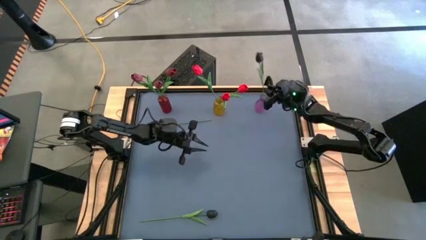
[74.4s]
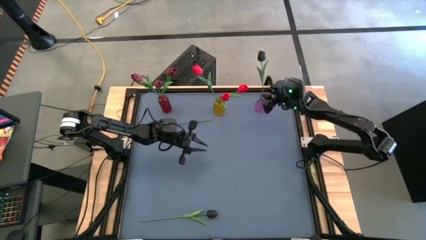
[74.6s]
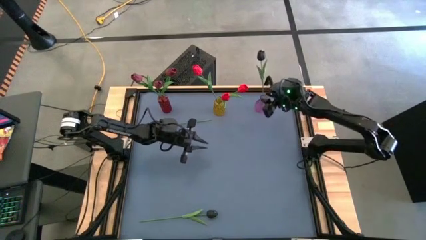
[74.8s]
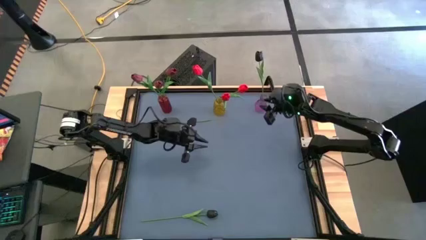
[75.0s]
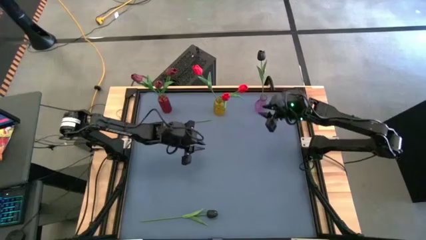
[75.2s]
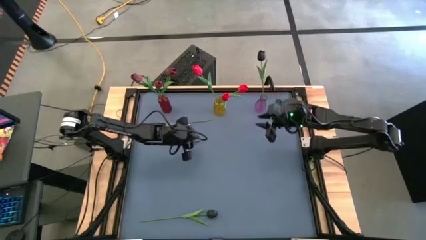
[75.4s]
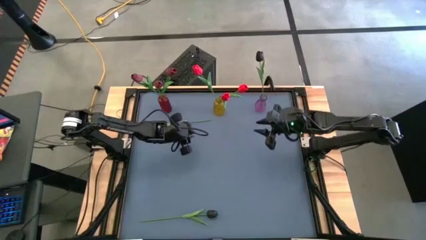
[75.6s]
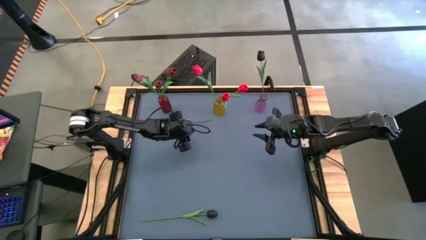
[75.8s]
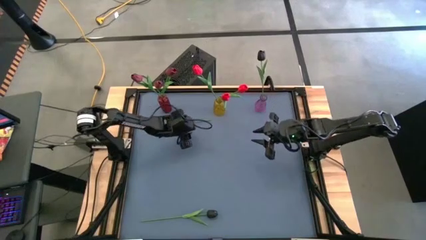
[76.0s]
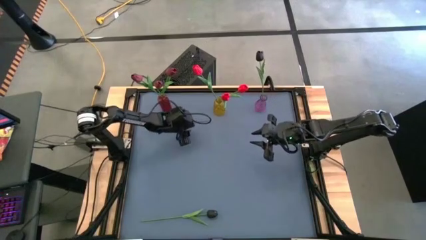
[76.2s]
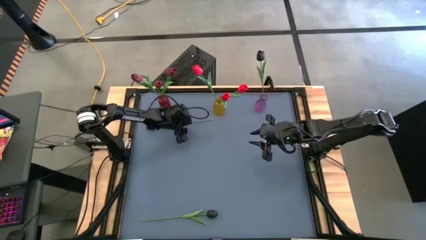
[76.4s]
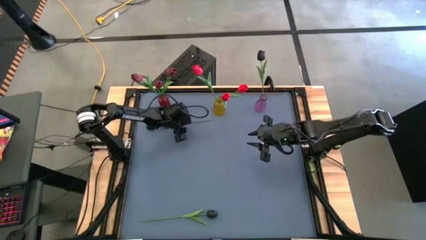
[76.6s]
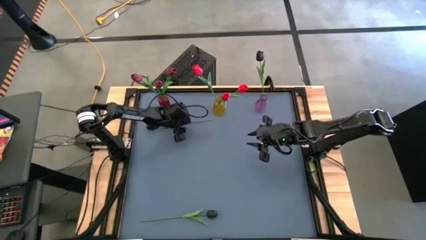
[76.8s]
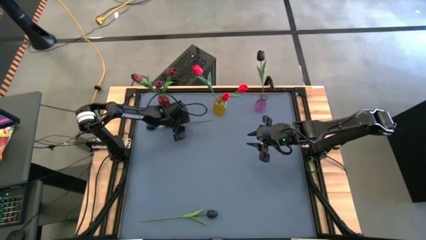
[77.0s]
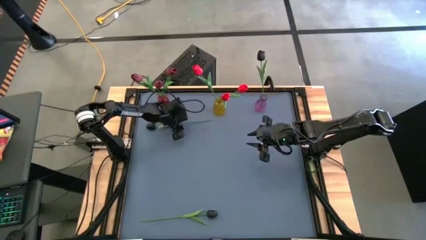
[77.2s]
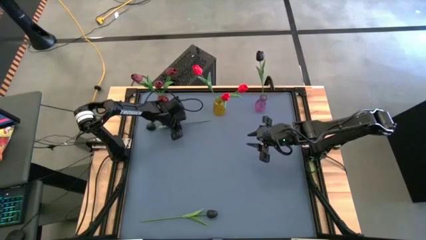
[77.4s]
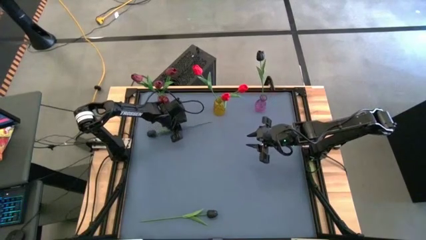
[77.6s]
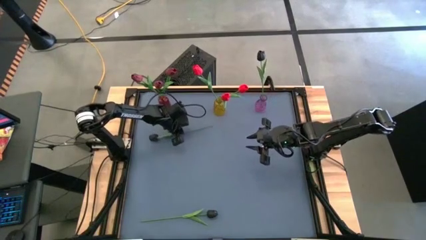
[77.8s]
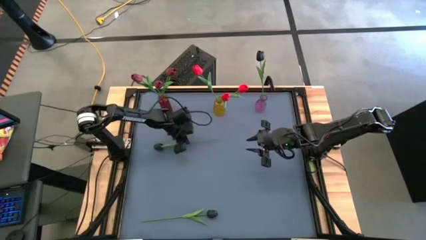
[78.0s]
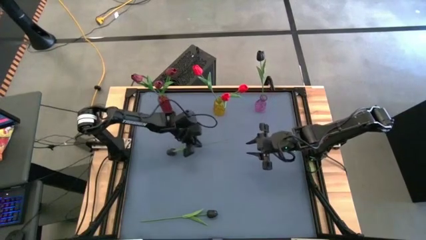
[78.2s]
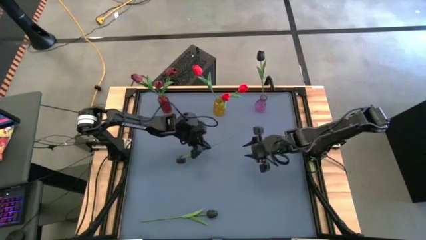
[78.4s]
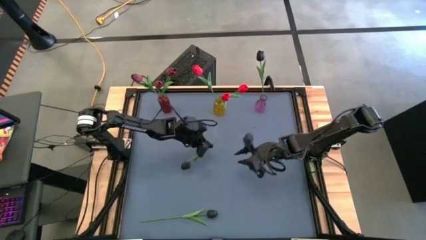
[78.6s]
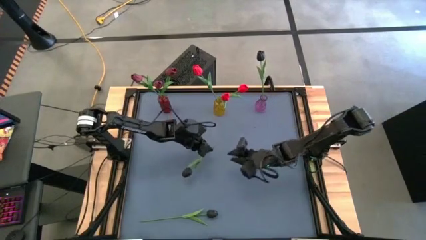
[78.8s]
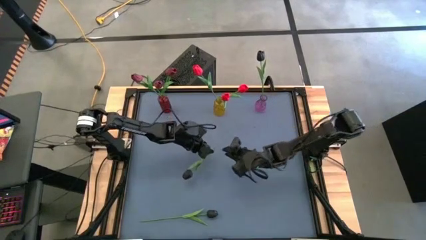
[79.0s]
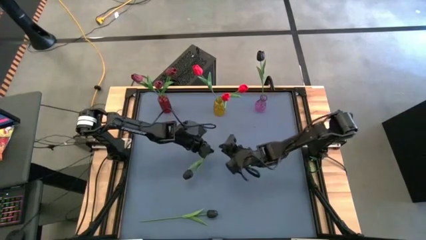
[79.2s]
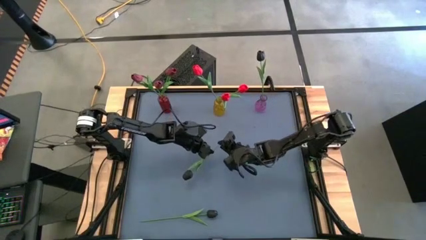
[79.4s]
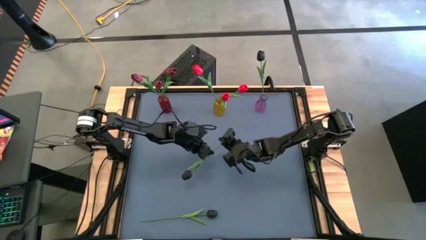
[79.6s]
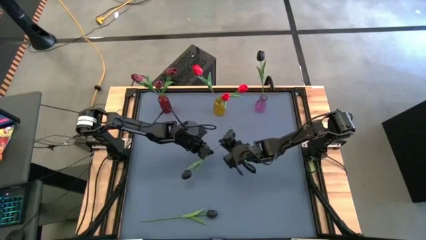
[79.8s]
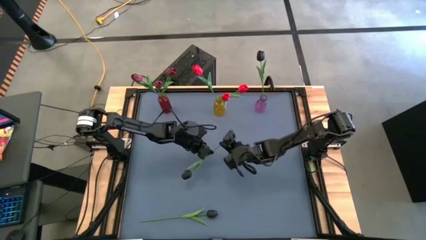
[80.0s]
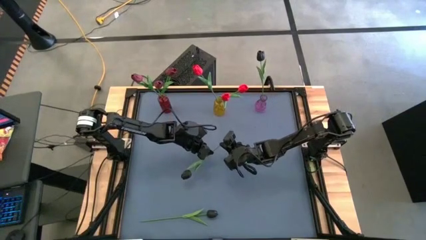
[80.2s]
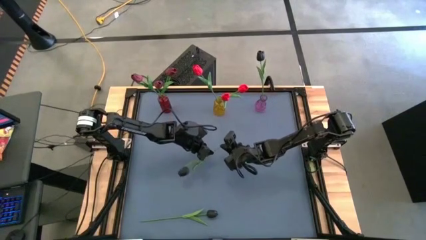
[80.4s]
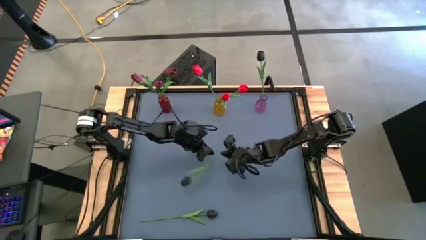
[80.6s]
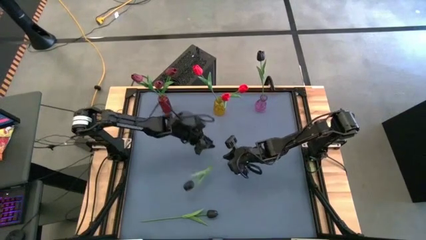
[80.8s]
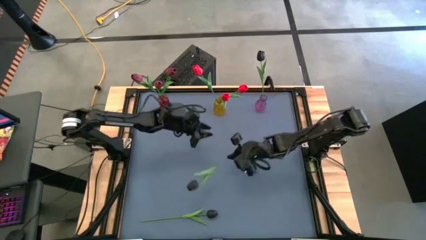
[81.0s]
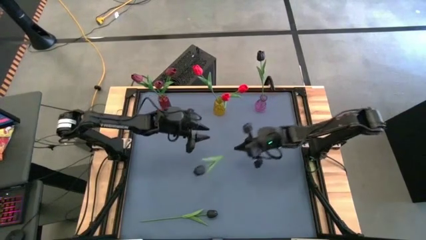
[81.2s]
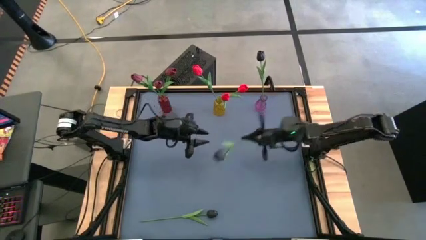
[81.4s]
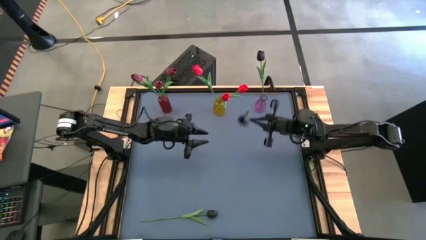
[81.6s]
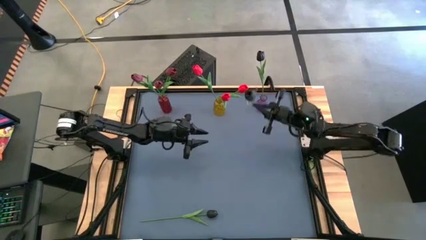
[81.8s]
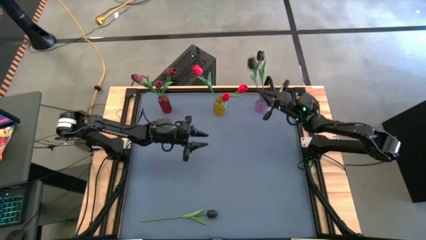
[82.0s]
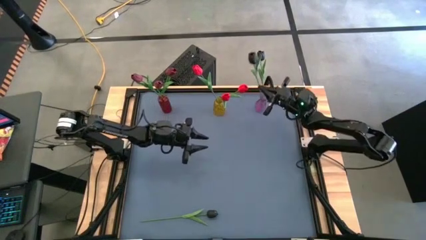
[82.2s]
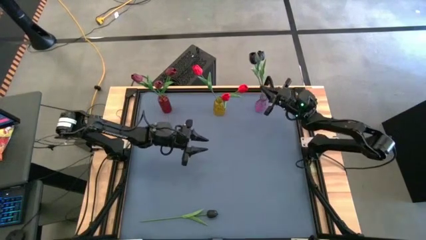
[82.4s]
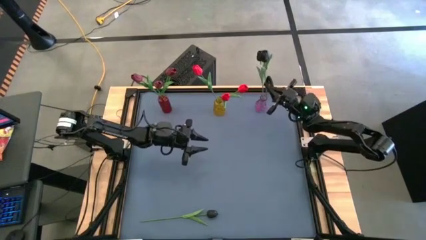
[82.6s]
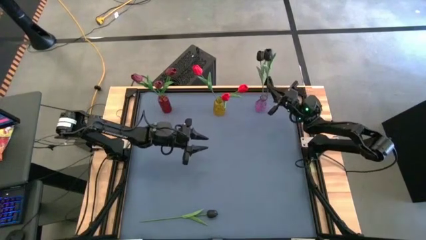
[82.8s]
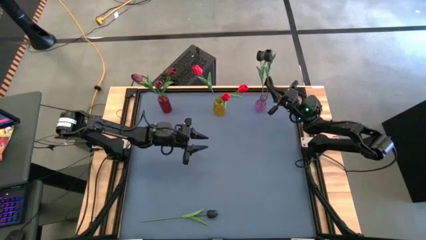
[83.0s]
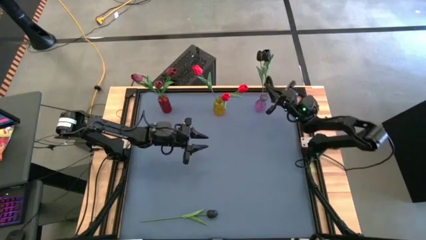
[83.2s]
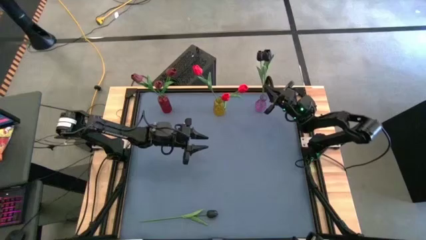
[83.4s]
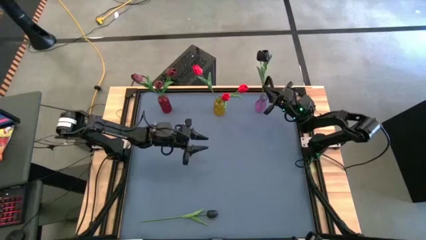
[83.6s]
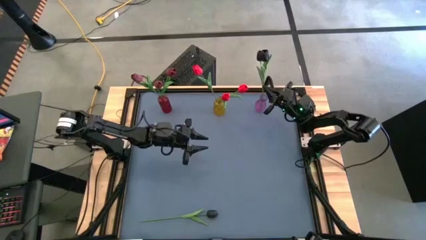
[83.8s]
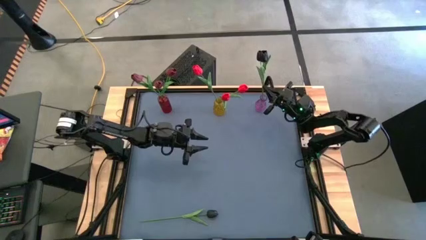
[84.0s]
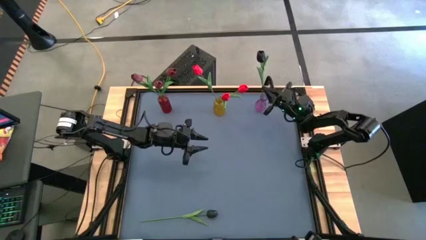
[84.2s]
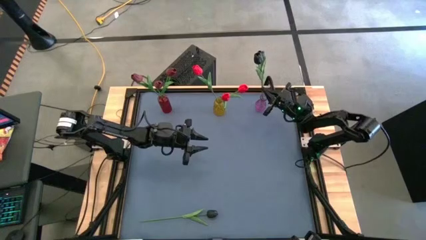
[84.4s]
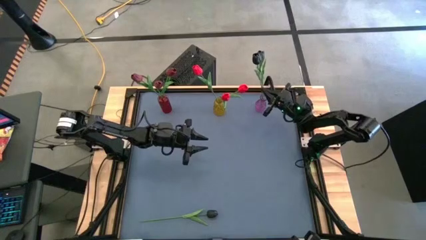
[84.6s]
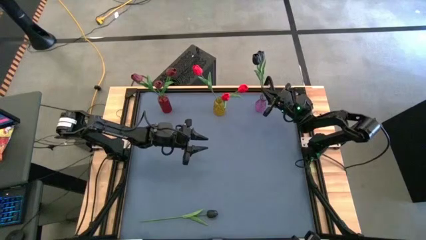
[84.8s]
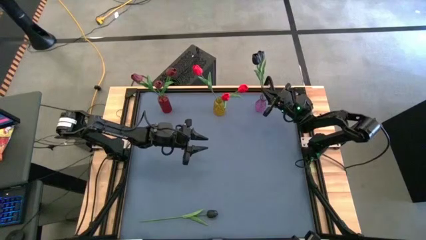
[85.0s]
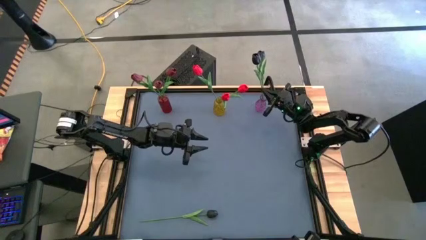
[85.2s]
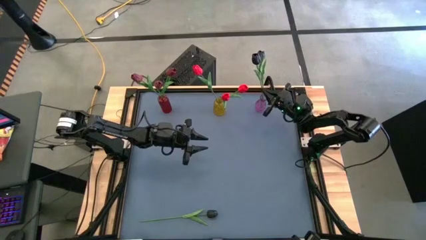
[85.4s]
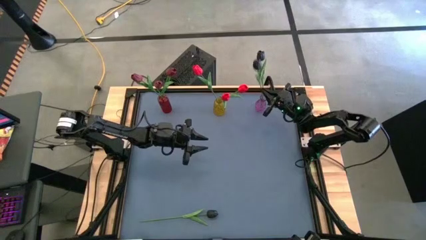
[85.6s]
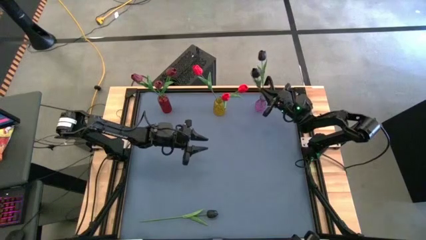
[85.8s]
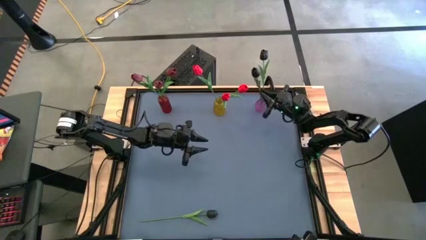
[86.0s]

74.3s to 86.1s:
Task: Sort flowers into vase by color
Put the top black tulip into the purple vase
